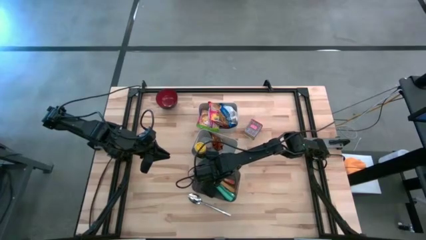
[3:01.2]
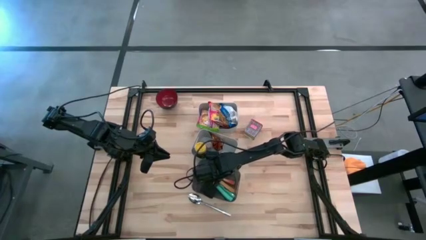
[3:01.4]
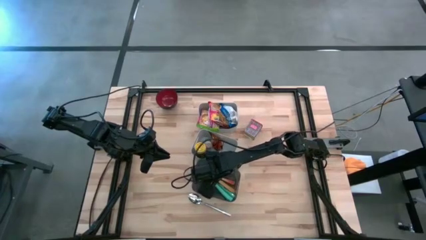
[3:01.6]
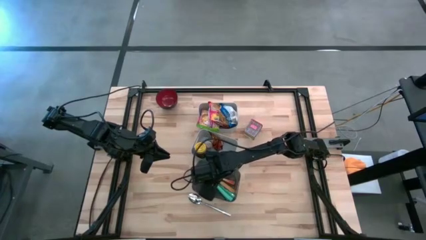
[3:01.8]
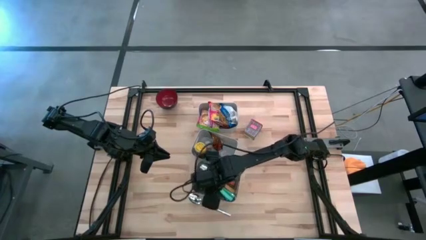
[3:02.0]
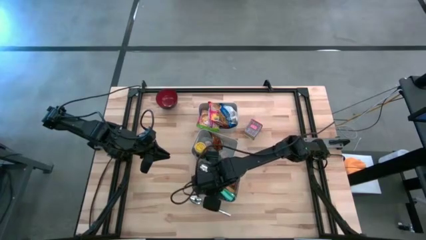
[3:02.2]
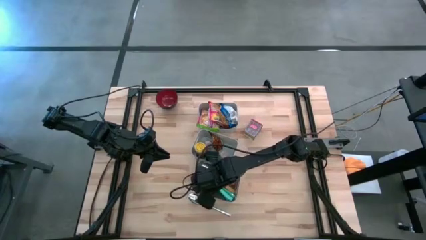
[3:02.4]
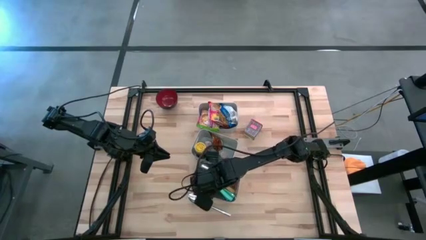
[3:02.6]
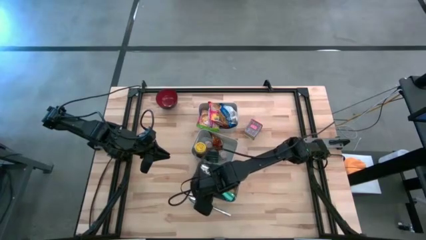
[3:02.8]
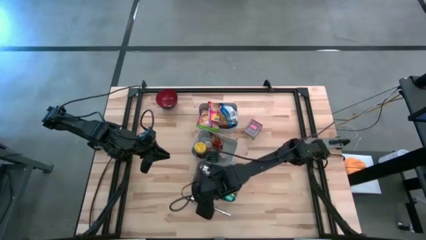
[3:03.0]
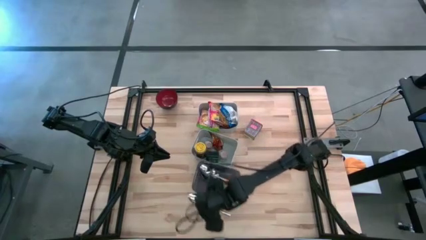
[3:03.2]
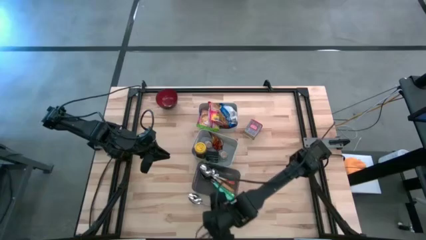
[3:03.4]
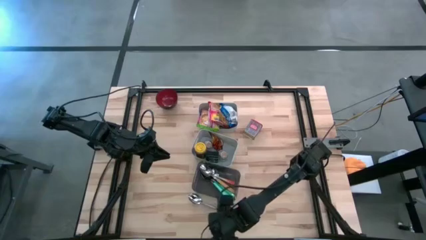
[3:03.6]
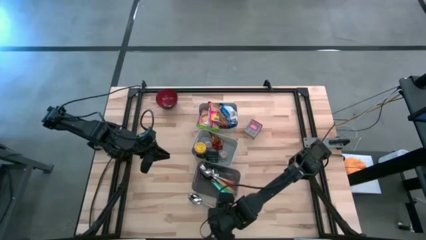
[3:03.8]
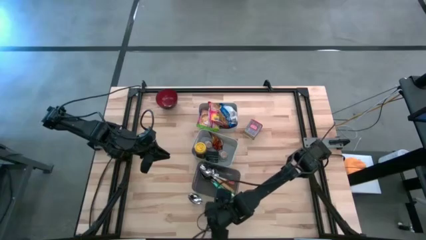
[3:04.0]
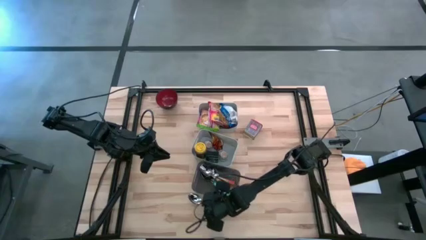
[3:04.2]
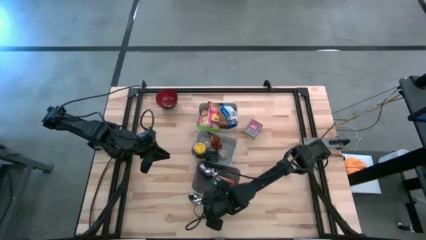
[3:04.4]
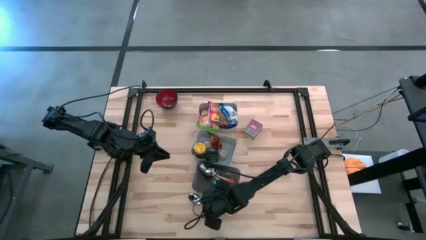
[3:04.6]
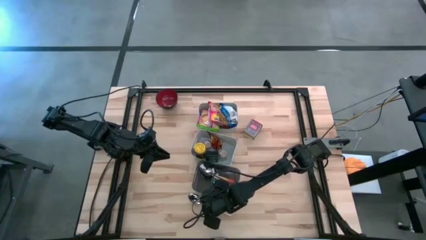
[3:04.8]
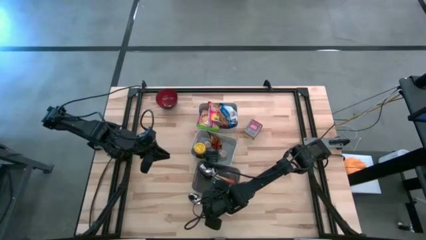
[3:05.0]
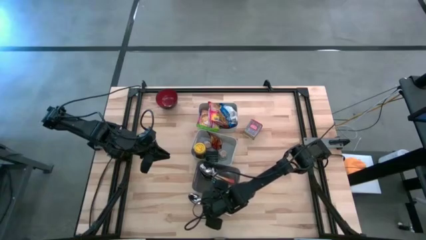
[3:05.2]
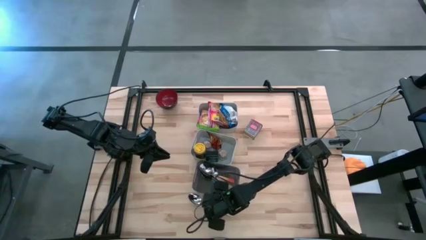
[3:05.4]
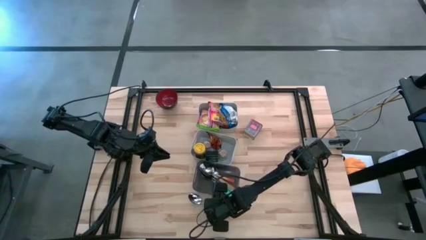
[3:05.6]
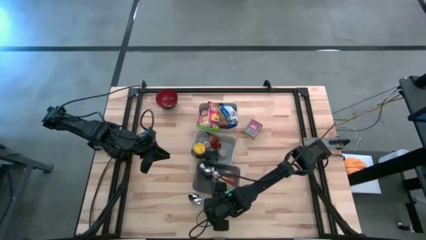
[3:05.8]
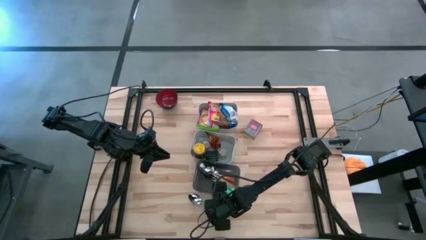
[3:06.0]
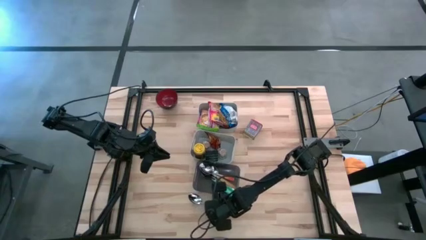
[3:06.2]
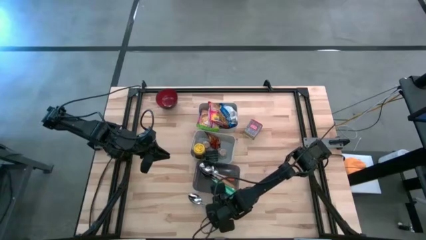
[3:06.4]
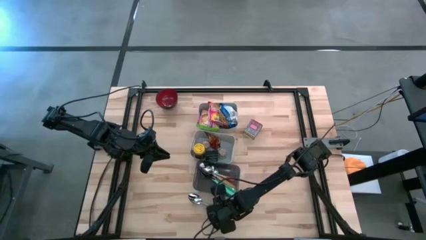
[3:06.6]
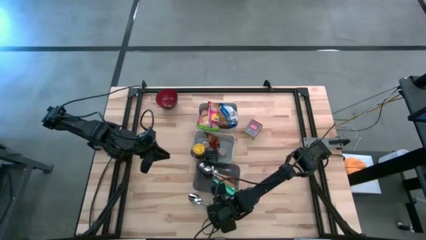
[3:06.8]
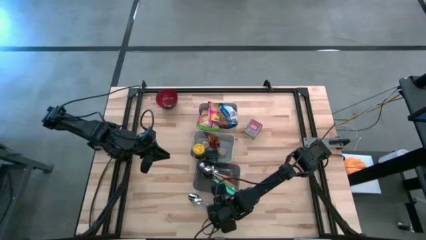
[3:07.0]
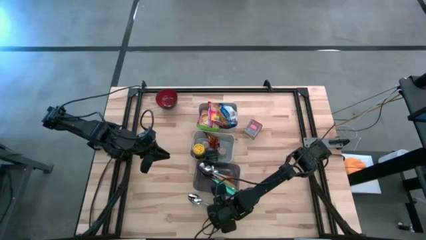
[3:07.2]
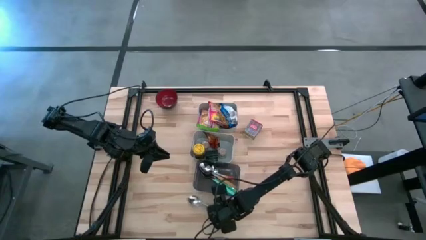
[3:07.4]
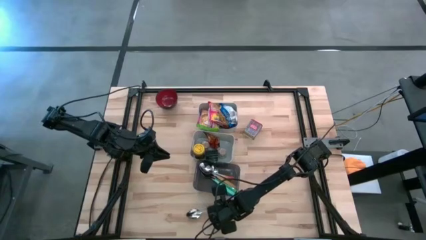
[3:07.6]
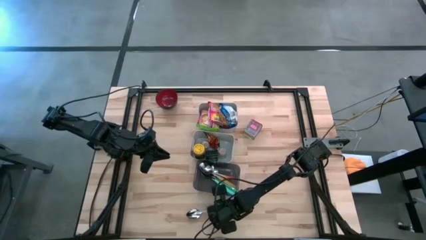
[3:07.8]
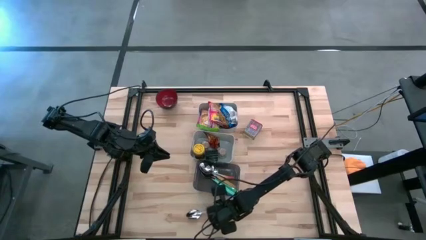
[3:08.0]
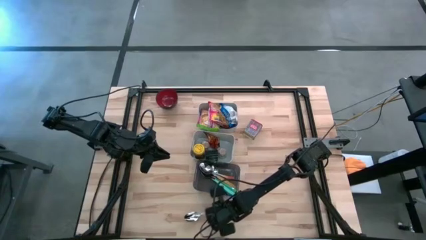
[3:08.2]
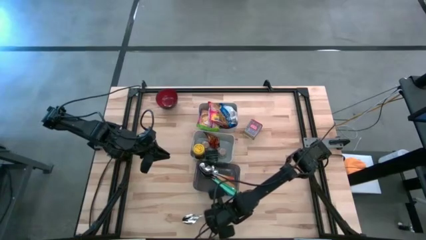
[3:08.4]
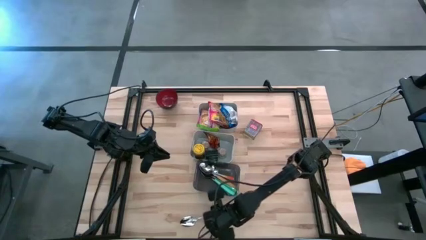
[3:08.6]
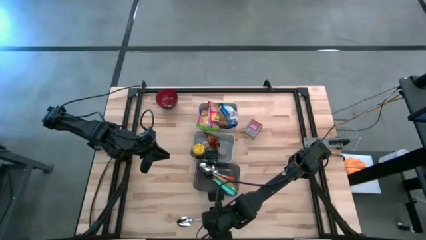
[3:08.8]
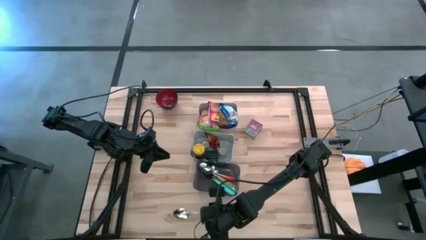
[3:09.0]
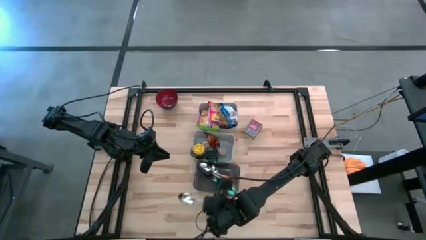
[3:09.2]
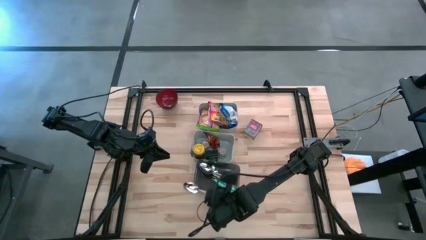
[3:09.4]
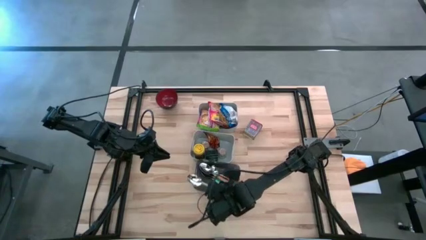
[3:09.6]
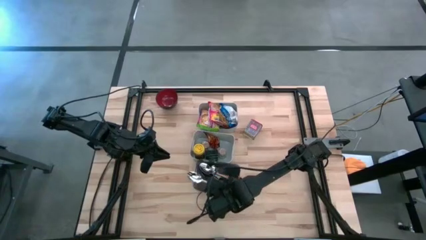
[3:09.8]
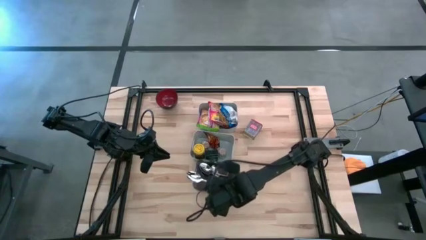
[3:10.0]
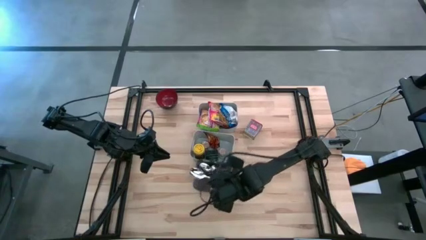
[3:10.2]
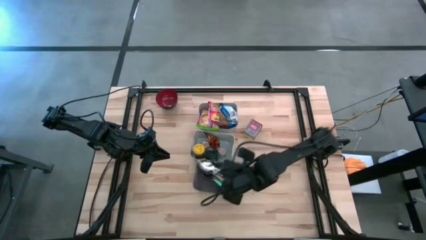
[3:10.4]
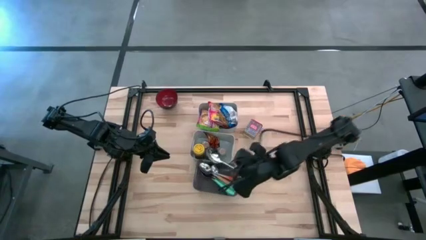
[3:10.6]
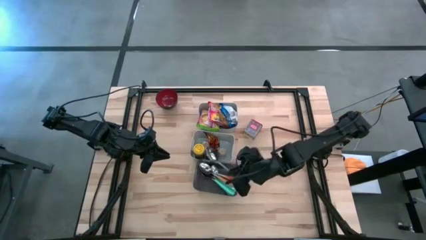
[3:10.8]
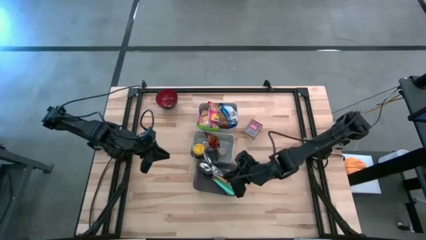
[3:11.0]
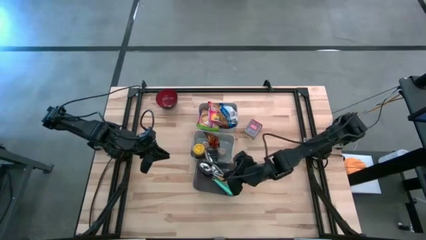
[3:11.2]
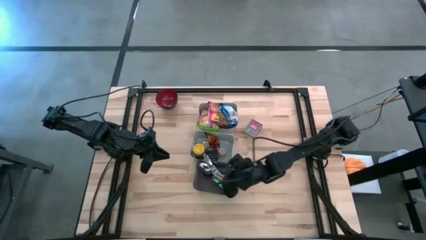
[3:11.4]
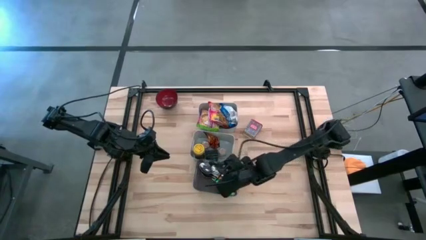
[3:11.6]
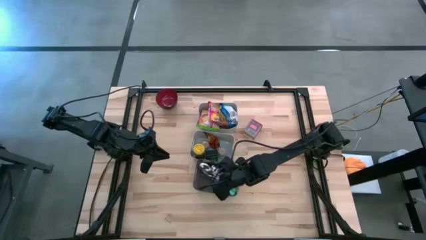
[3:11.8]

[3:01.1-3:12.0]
Put the silver spoon into the black bin

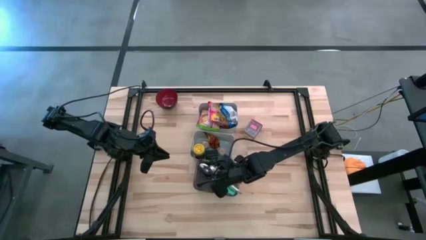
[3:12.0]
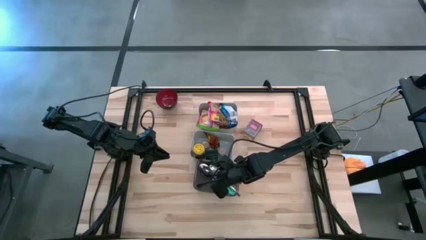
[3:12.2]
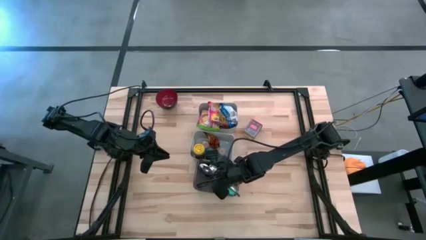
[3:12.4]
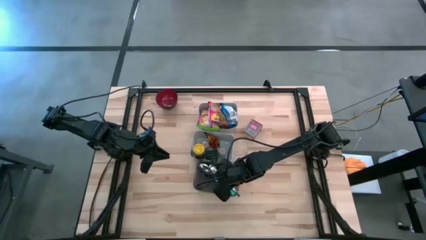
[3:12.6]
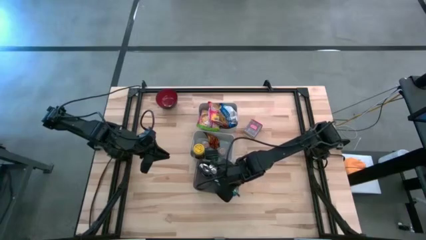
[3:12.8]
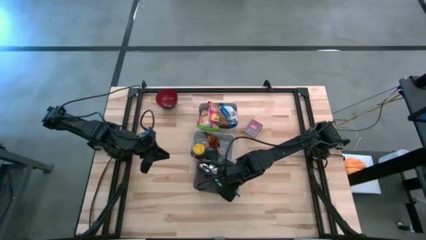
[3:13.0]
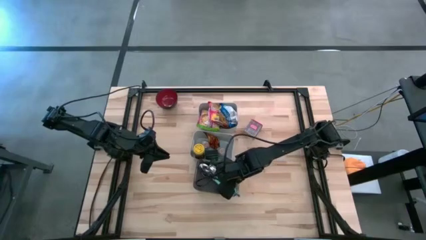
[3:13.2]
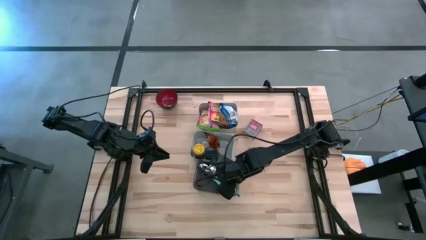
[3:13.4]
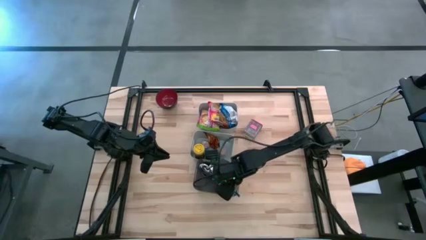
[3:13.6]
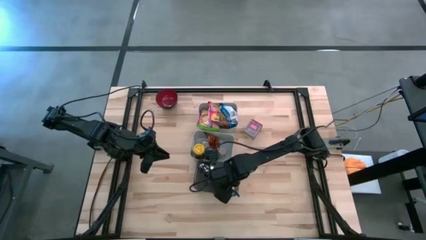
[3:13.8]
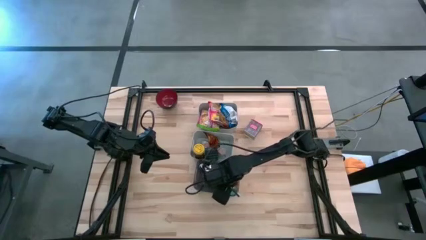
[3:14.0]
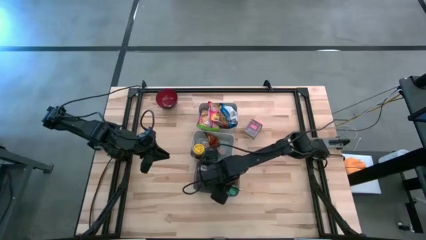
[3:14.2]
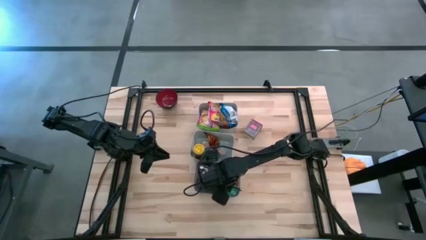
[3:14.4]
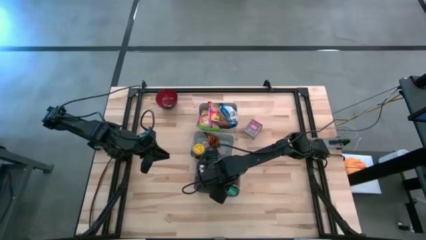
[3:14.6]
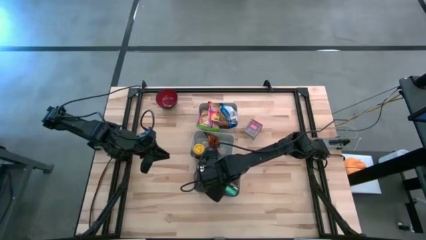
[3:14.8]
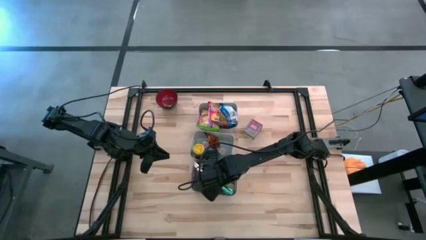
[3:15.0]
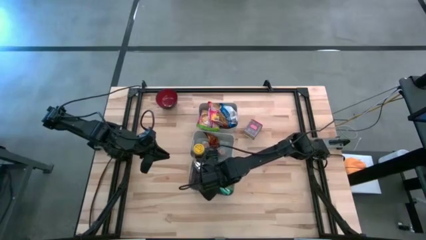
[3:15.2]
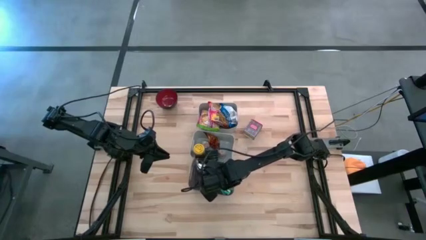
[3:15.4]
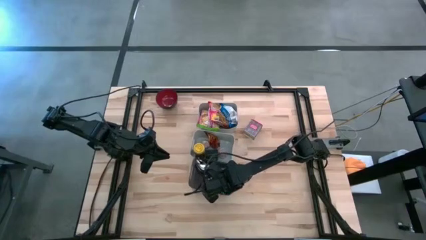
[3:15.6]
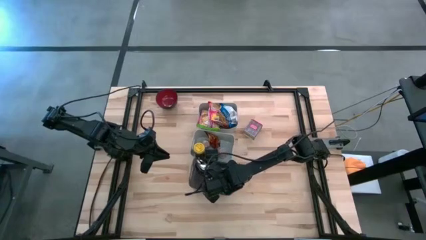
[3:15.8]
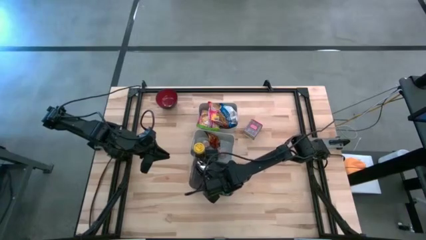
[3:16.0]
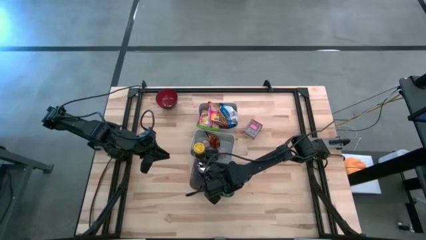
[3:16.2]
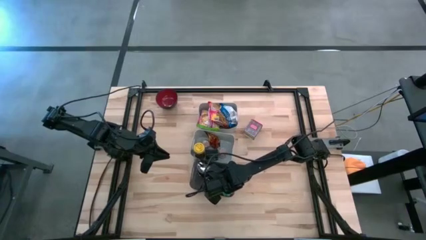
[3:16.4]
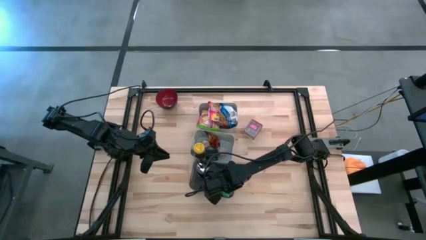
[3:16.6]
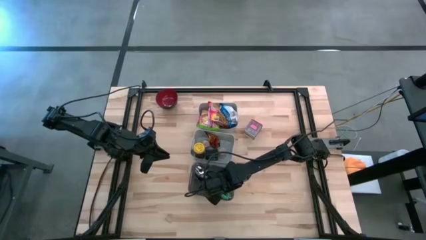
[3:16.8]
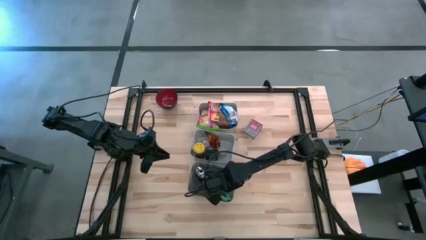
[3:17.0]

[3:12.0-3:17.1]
Put the silver spoon into the black bin
